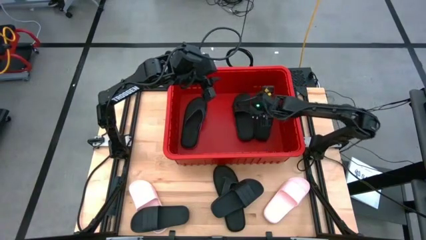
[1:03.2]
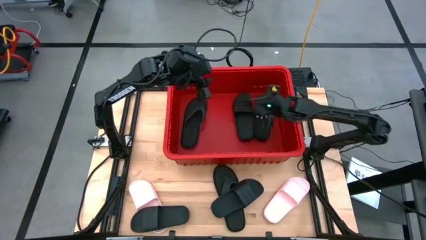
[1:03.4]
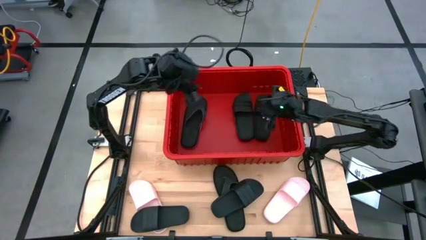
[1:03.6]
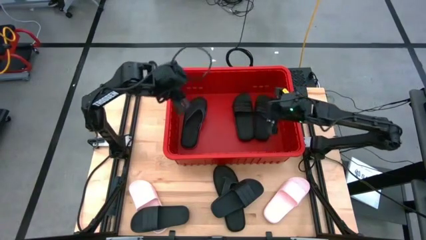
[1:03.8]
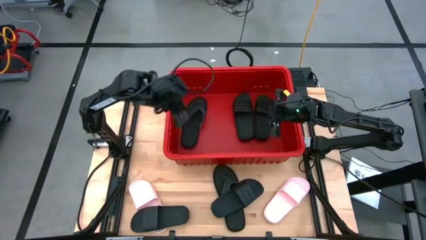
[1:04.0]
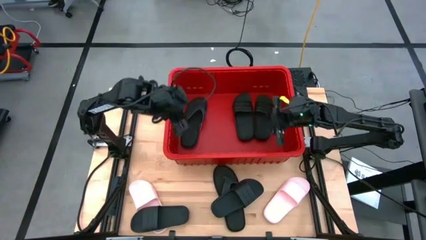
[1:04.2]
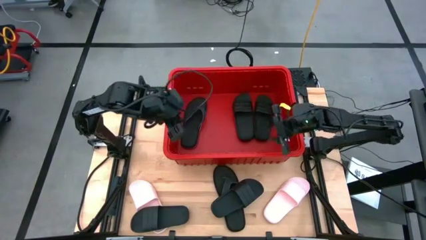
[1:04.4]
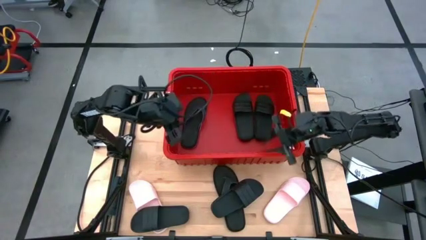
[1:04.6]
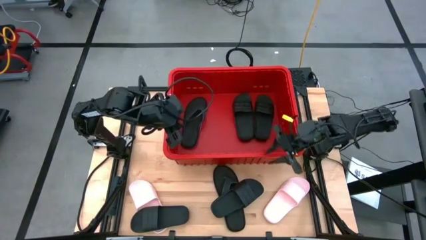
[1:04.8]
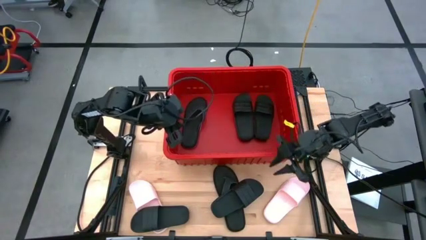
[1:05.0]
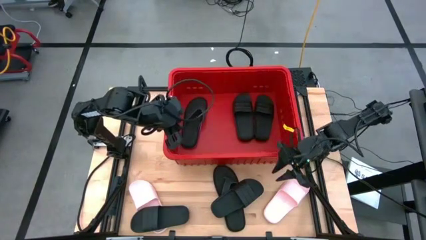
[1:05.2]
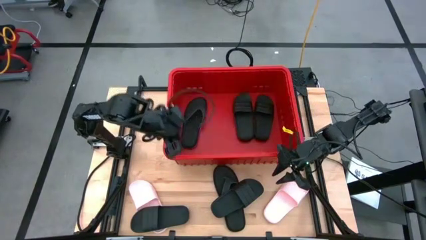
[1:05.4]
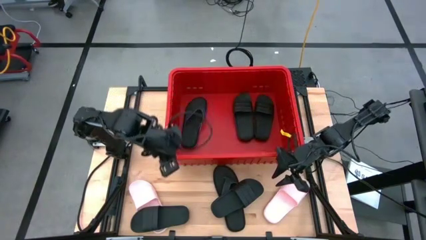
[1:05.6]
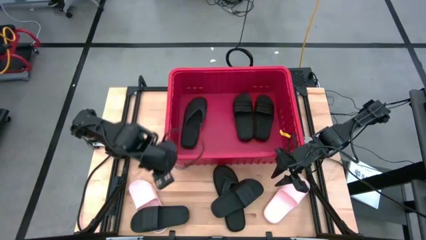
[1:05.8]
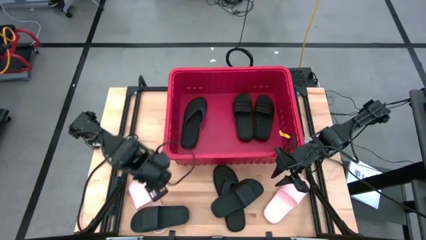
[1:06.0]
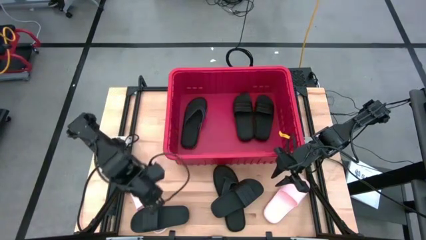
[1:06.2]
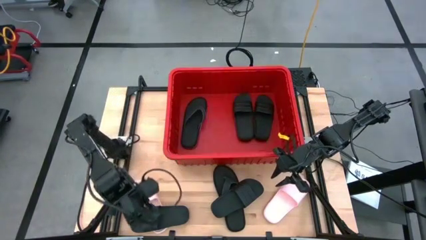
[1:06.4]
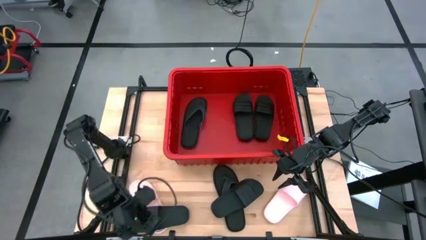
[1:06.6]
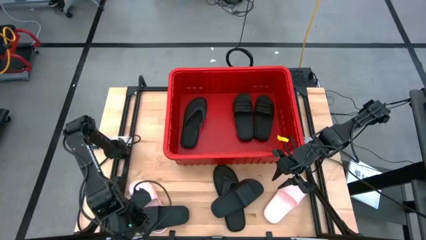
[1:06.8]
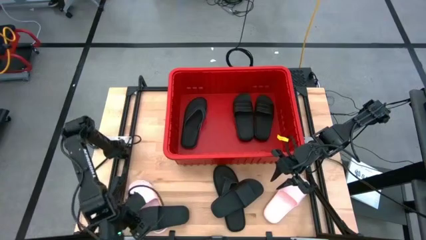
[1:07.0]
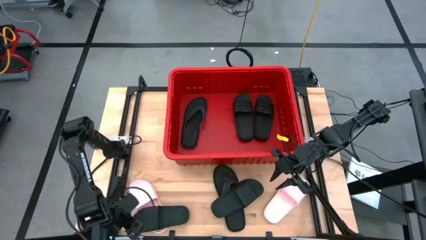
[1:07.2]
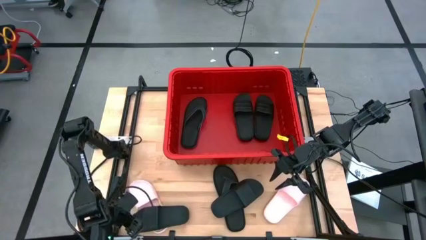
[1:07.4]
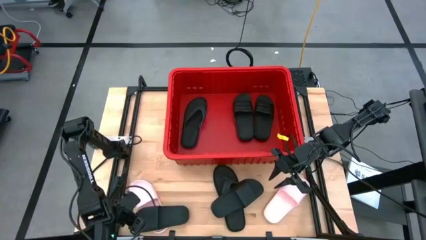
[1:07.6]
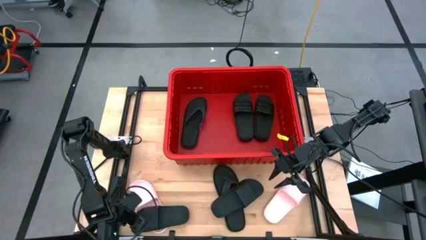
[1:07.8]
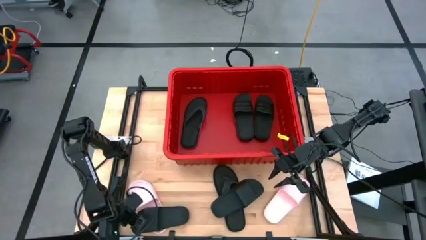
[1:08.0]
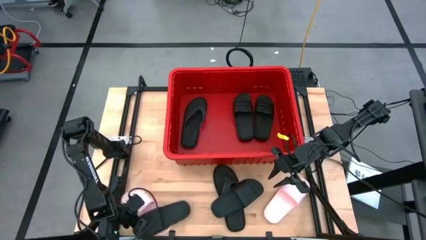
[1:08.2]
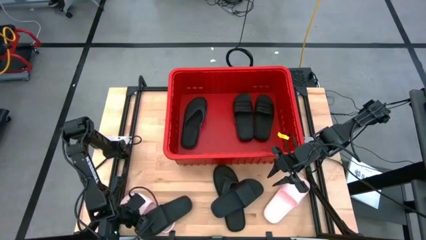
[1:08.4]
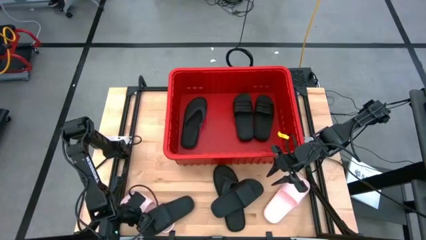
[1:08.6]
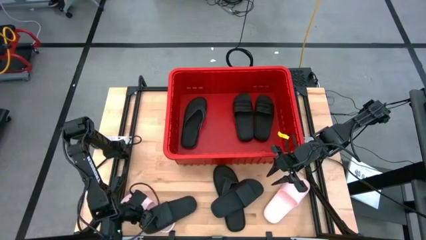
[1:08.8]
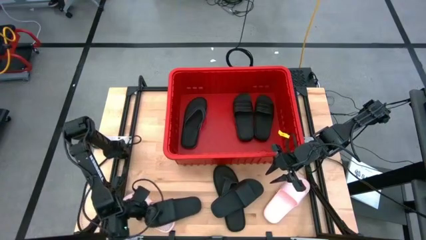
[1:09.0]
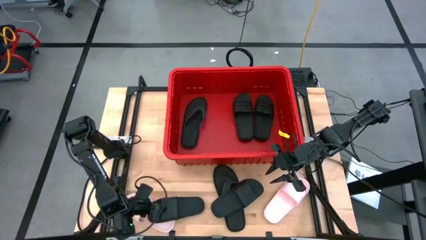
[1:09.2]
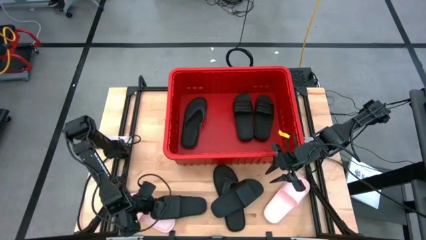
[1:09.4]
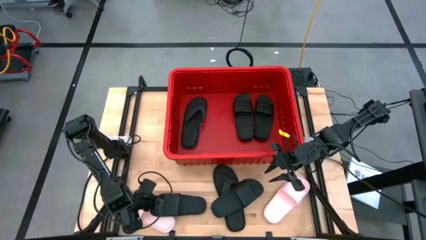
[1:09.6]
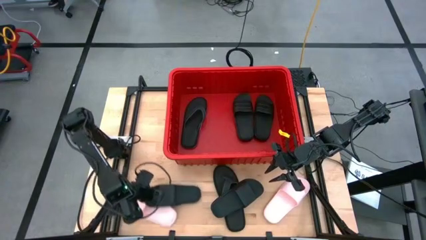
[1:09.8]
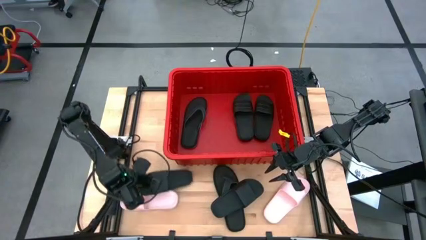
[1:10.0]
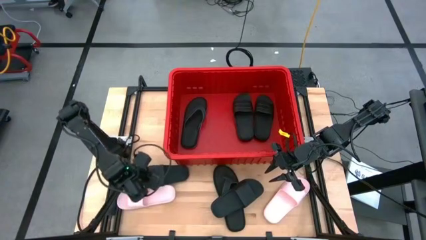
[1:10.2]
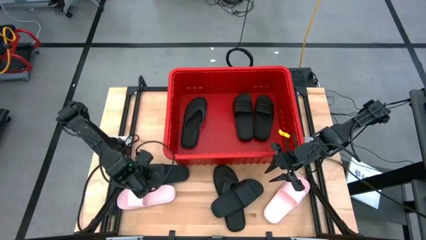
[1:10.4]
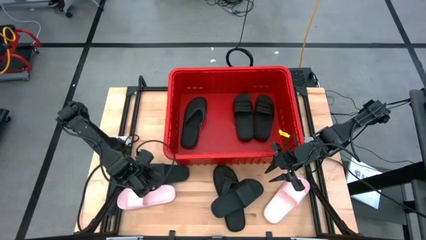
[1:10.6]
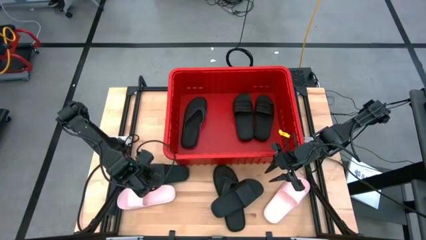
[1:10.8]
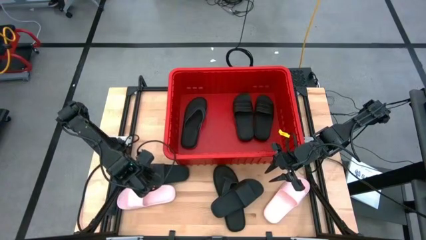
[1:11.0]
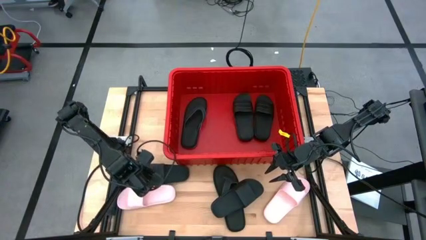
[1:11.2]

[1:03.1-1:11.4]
Task: Pick and place slides into bin
Move the black slide to the middle left of the table

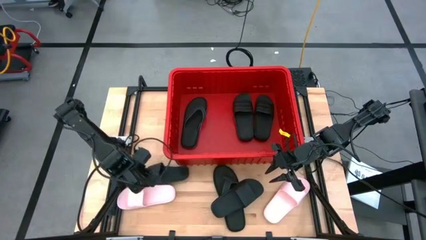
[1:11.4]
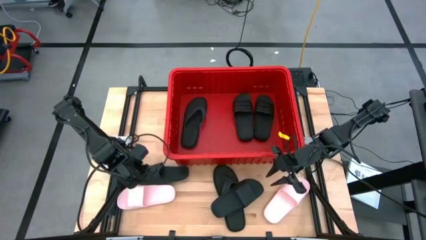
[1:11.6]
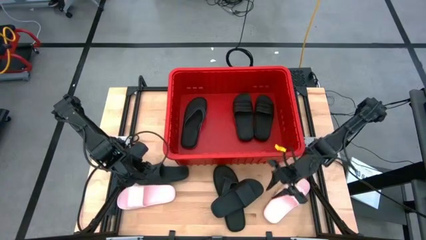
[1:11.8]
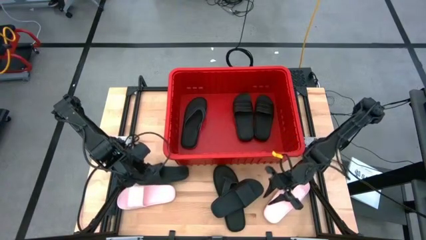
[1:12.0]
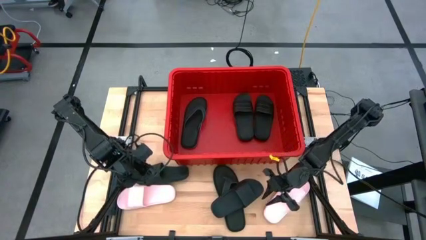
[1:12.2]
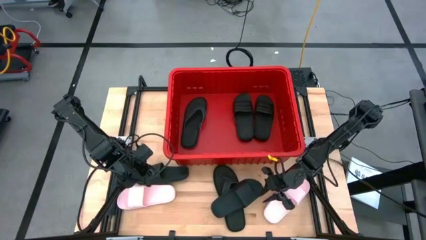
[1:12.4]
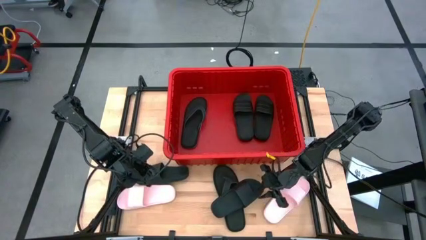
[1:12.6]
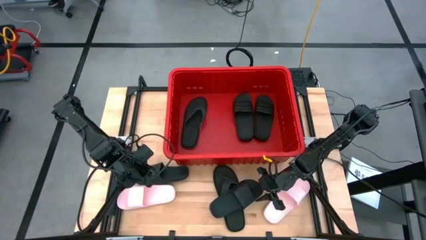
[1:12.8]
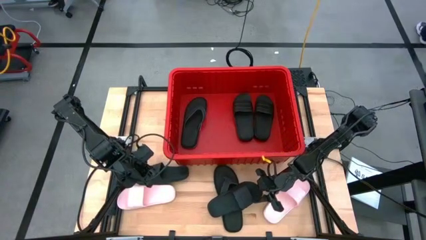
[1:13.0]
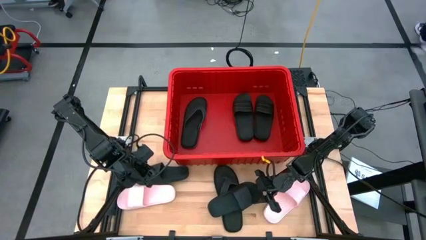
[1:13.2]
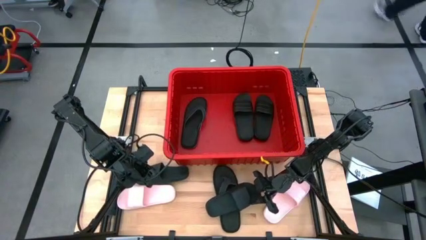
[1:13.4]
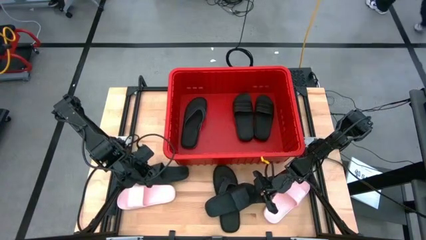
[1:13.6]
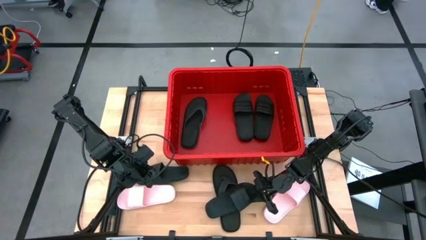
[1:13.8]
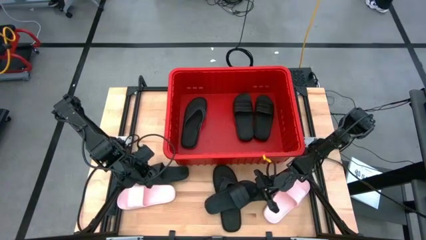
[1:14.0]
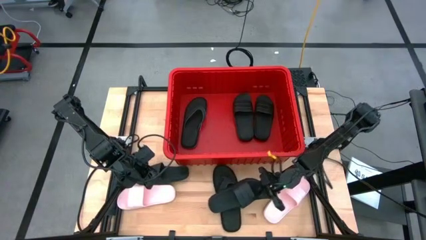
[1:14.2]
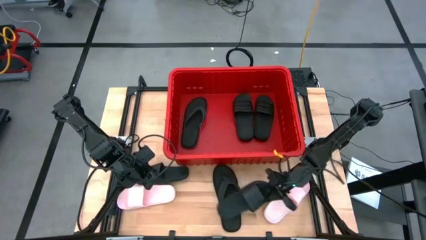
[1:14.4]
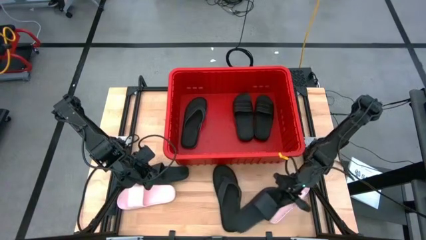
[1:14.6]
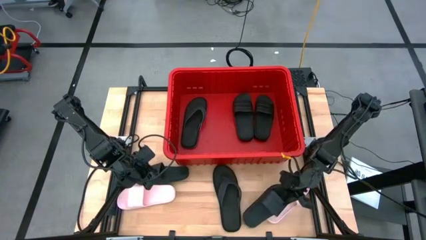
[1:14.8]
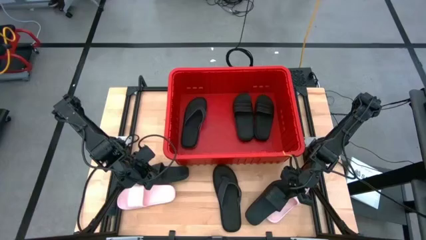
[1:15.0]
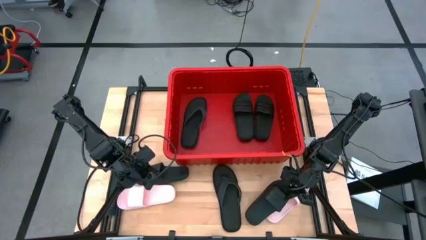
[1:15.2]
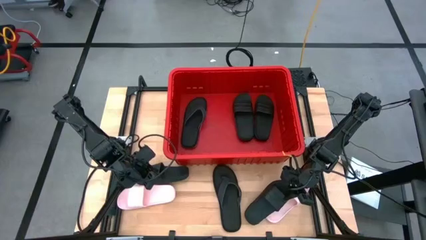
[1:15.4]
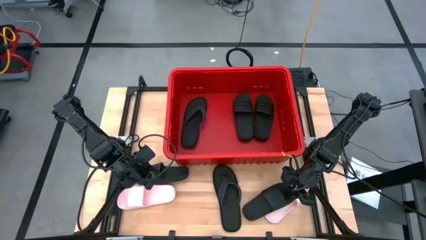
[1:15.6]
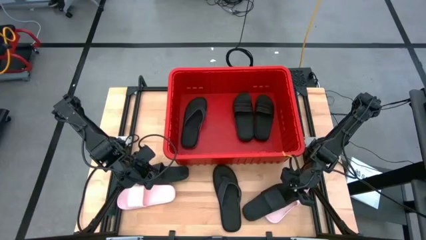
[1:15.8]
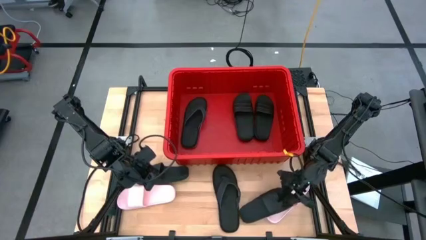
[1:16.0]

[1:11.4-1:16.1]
Move the black slide to the bottom right of the table

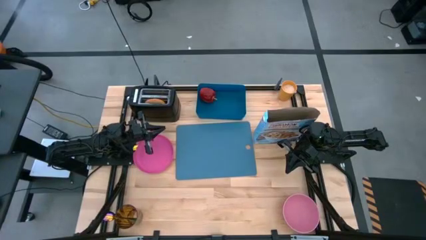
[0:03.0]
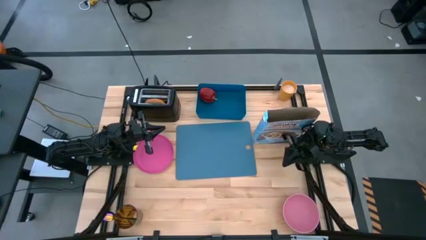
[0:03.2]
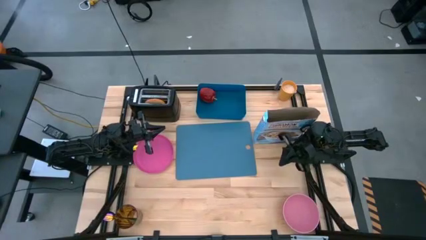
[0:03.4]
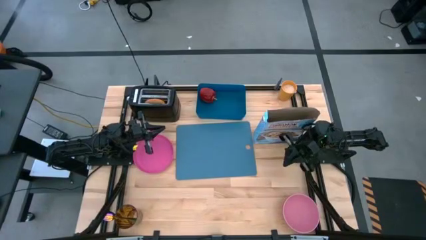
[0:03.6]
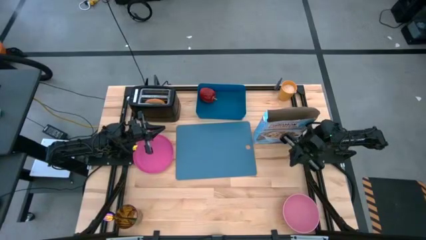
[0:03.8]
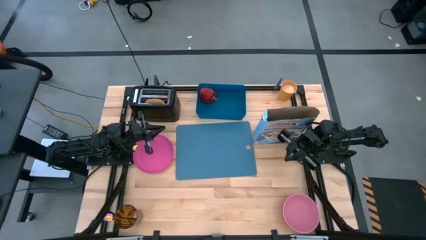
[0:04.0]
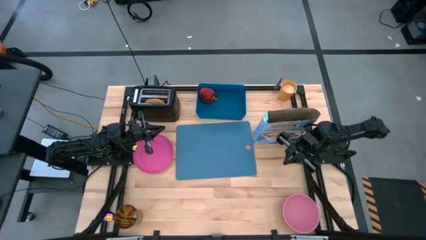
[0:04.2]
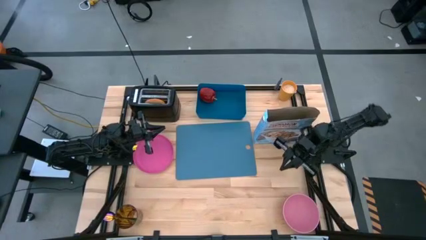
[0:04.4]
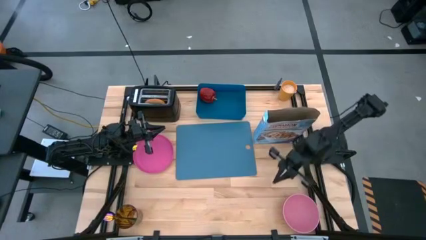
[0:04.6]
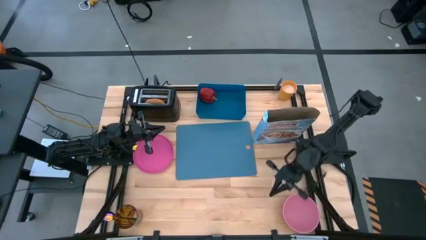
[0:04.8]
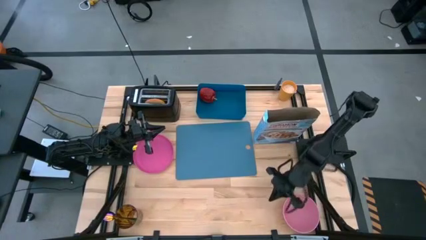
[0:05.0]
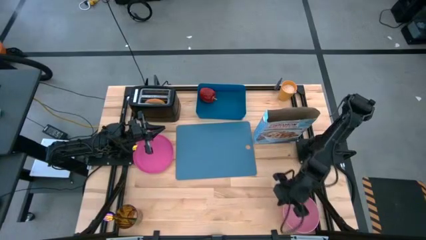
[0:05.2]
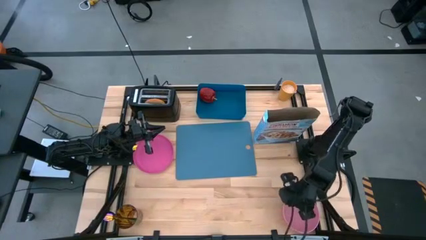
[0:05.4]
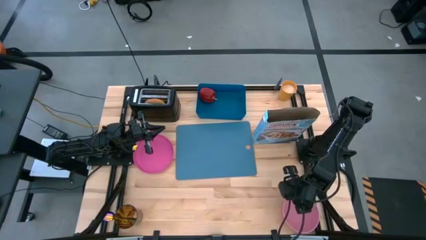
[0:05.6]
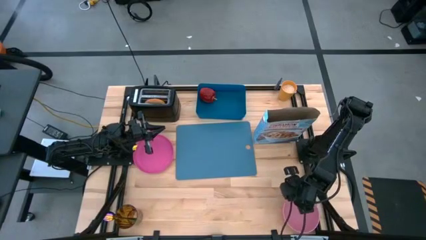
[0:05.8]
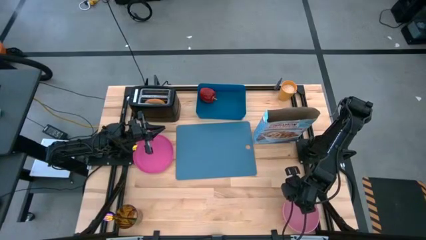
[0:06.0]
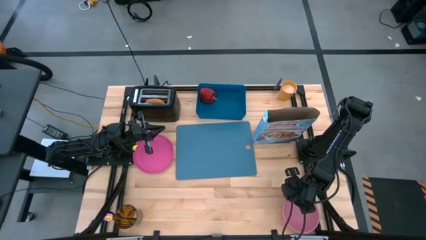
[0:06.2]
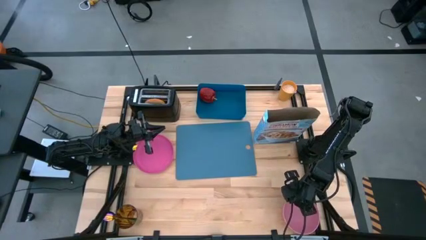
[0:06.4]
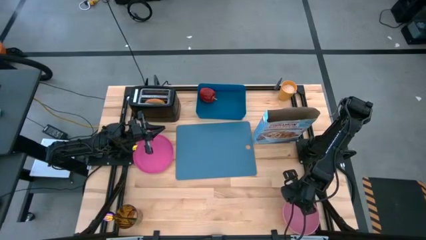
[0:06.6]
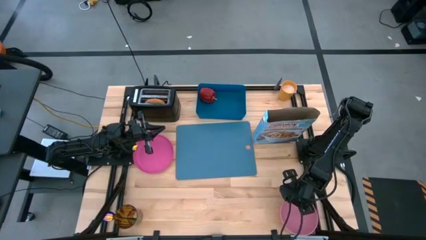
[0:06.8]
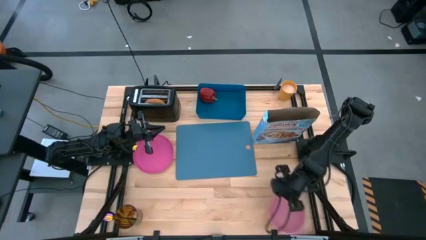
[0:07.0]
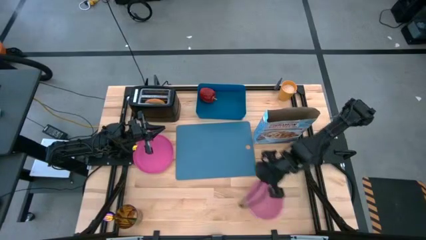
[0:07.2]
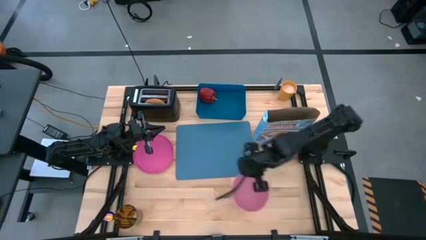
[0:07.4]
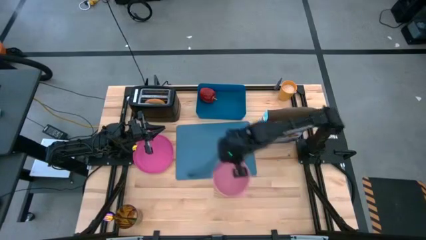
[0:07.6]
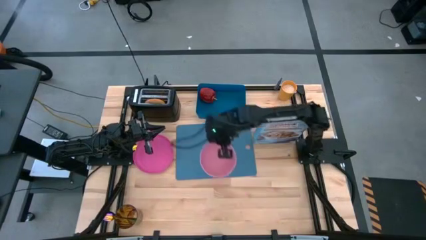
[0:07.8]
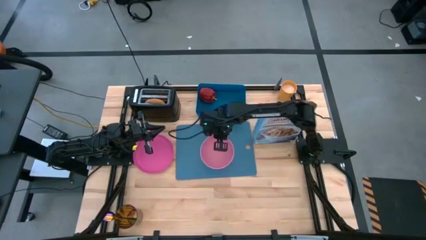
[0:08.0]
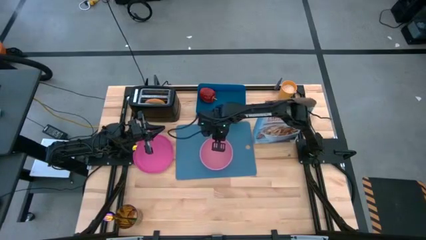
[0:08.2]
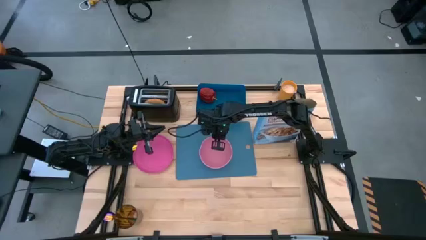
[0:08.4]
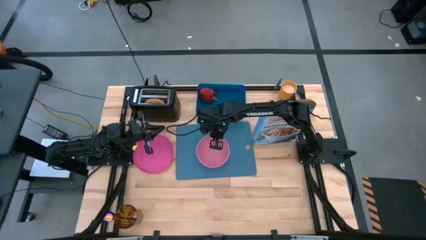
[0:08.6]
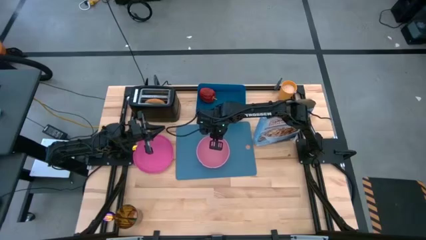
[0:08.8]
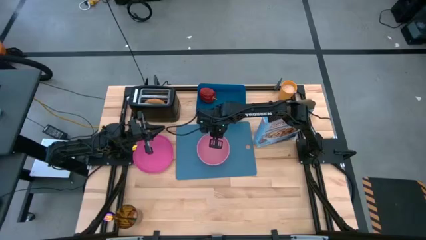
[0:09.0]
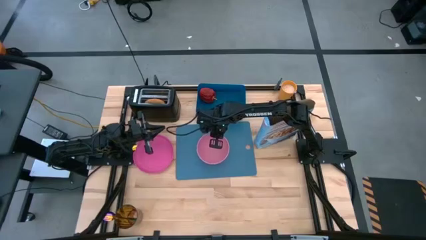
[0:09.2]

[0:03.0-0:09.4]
Task: Arrange a breakfast setting
Put the pink bowl on the blue placemat
